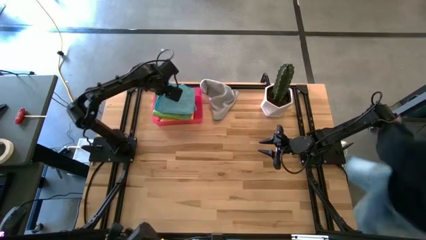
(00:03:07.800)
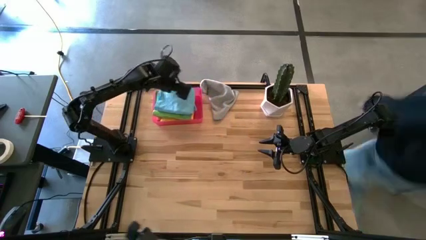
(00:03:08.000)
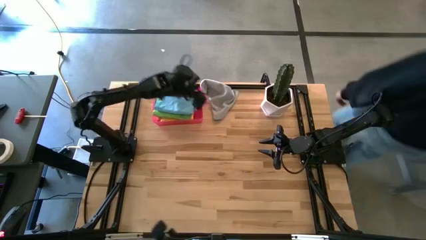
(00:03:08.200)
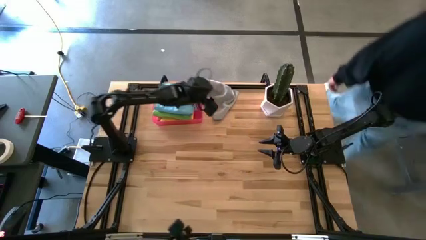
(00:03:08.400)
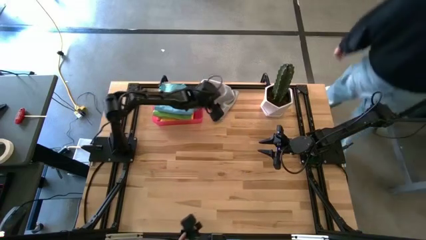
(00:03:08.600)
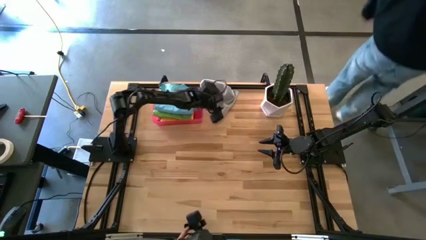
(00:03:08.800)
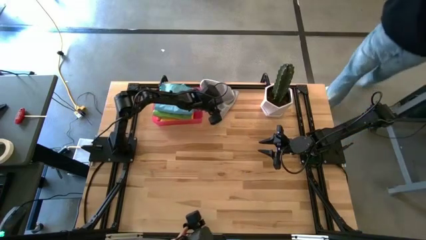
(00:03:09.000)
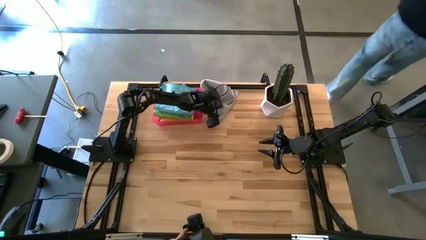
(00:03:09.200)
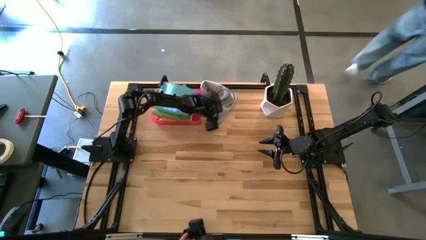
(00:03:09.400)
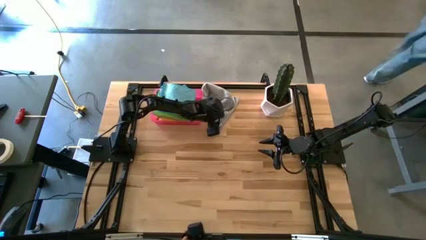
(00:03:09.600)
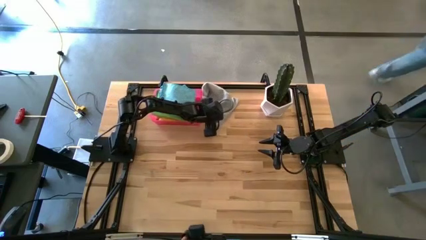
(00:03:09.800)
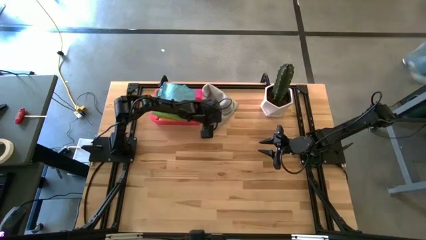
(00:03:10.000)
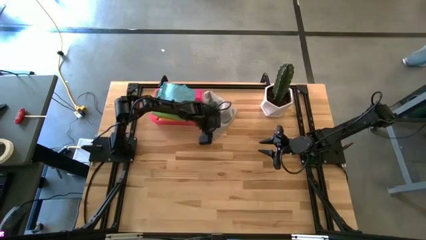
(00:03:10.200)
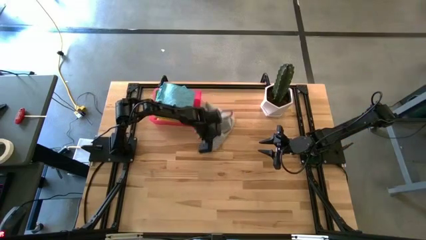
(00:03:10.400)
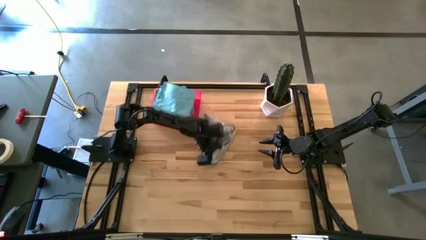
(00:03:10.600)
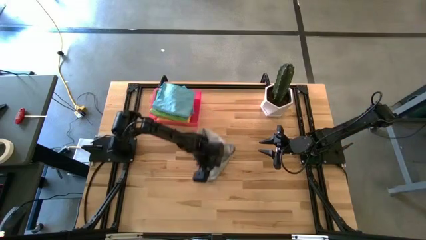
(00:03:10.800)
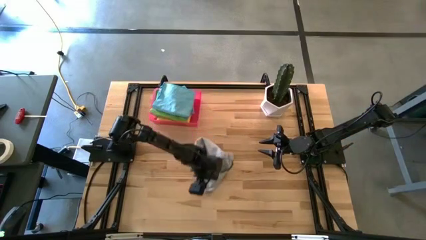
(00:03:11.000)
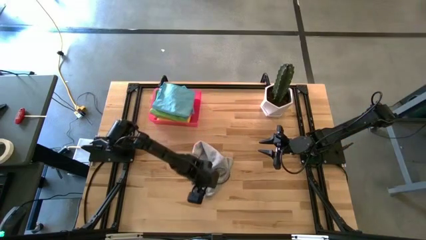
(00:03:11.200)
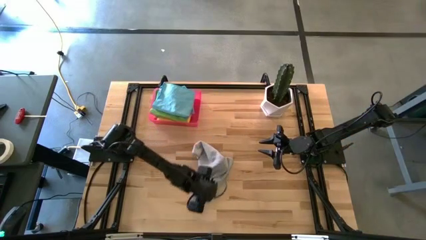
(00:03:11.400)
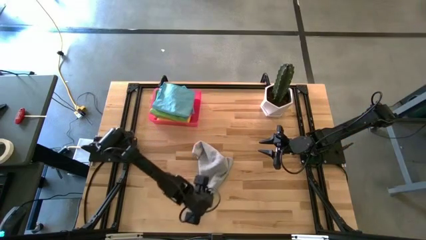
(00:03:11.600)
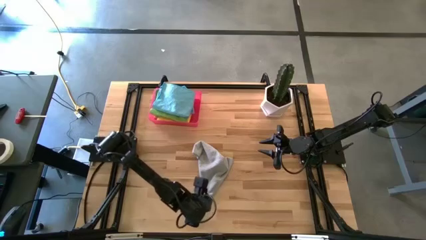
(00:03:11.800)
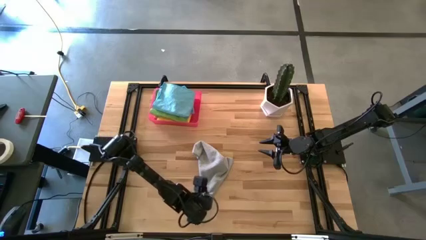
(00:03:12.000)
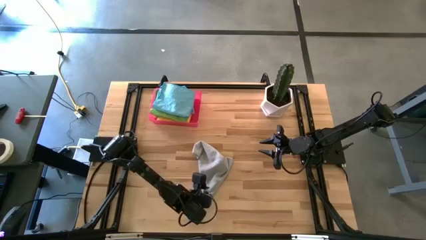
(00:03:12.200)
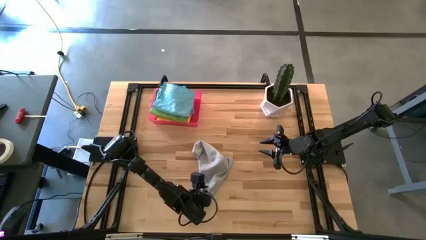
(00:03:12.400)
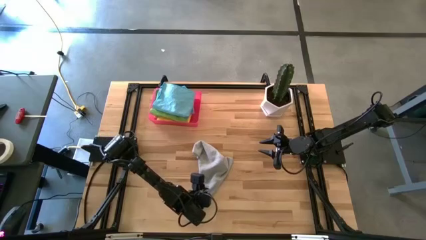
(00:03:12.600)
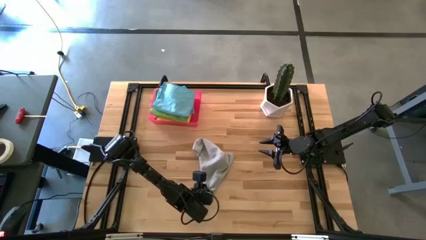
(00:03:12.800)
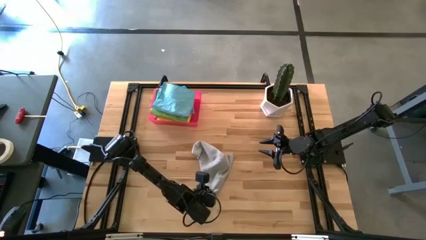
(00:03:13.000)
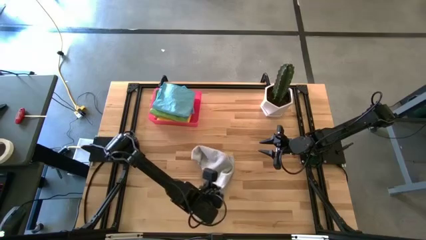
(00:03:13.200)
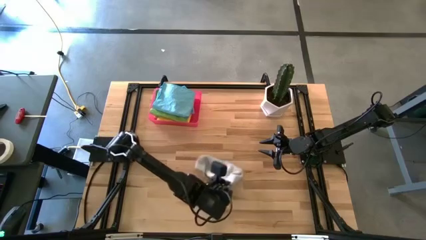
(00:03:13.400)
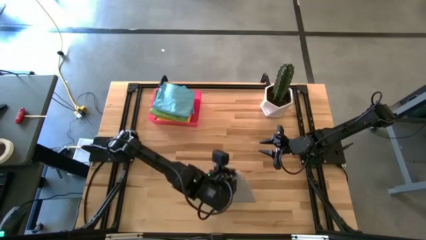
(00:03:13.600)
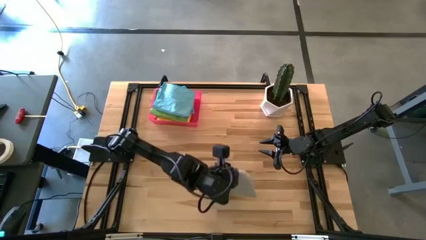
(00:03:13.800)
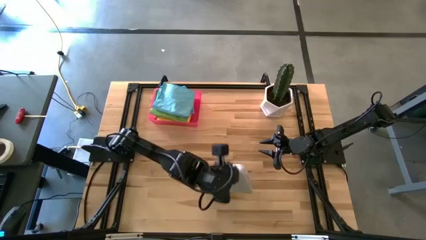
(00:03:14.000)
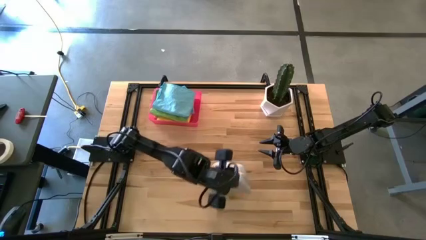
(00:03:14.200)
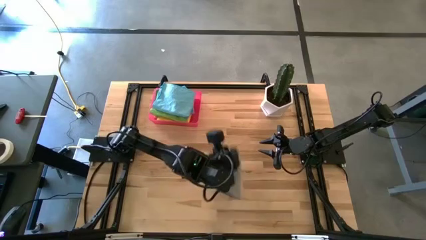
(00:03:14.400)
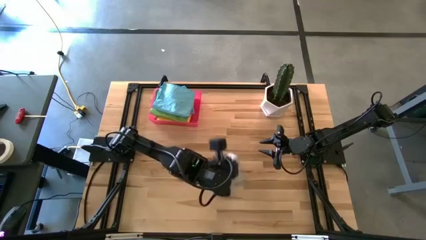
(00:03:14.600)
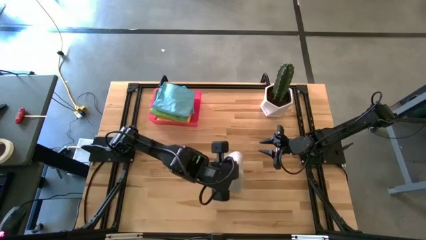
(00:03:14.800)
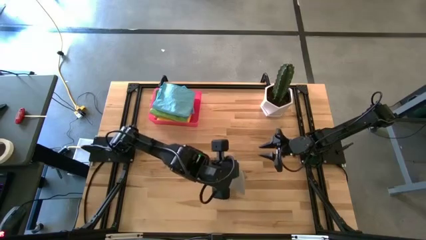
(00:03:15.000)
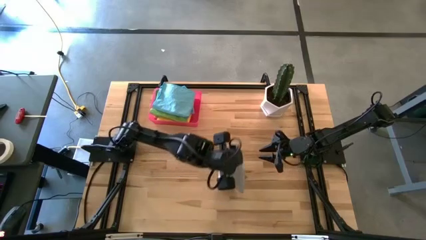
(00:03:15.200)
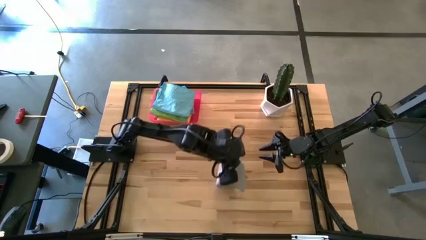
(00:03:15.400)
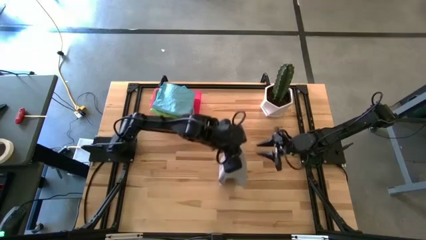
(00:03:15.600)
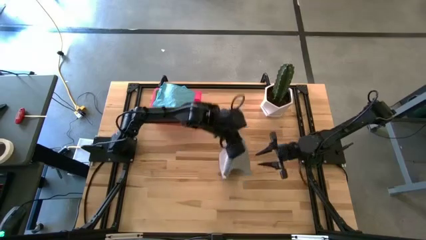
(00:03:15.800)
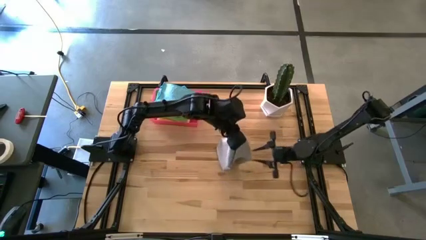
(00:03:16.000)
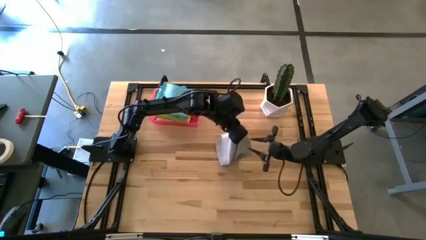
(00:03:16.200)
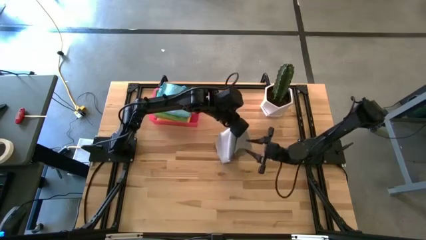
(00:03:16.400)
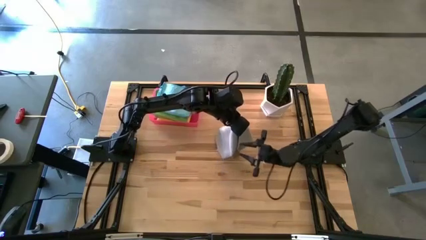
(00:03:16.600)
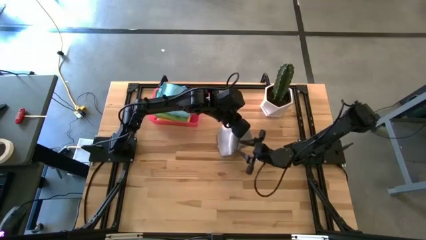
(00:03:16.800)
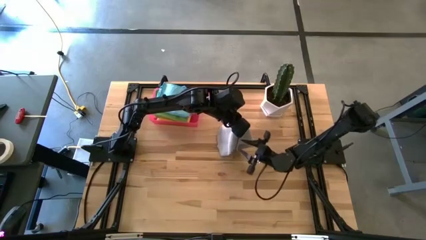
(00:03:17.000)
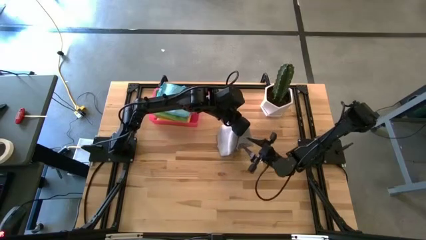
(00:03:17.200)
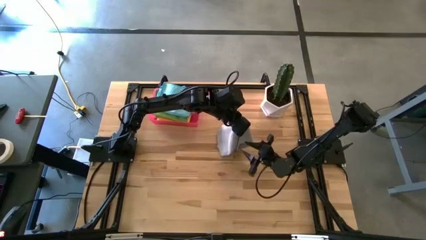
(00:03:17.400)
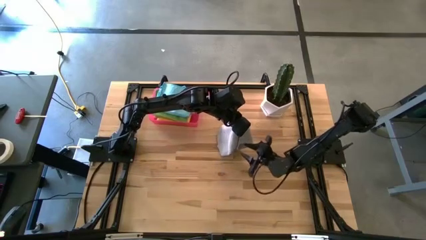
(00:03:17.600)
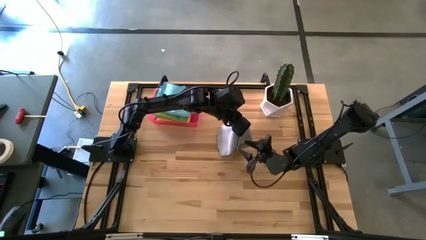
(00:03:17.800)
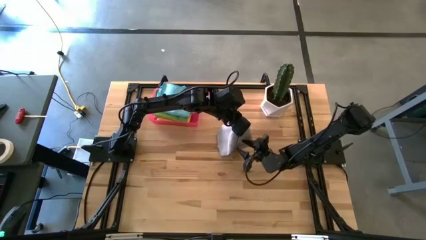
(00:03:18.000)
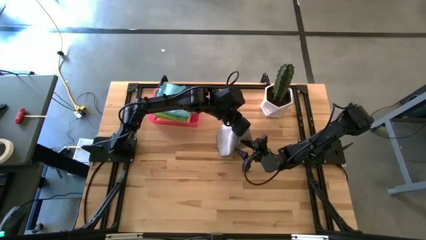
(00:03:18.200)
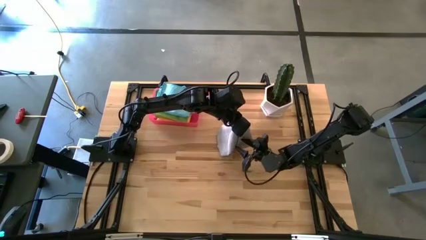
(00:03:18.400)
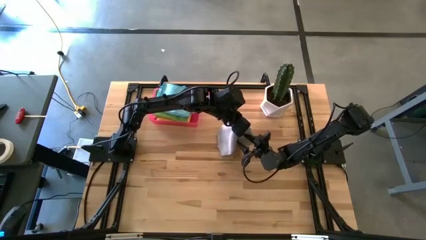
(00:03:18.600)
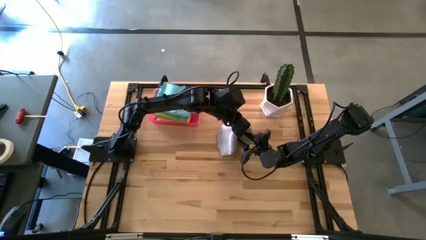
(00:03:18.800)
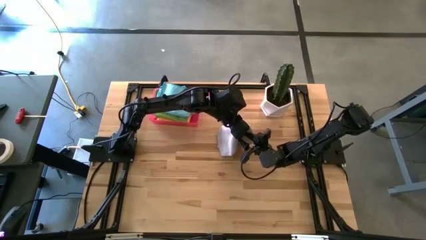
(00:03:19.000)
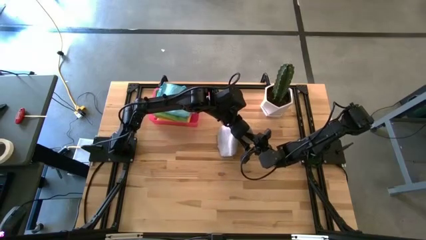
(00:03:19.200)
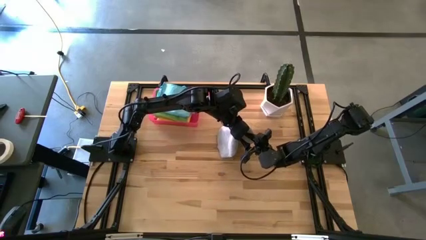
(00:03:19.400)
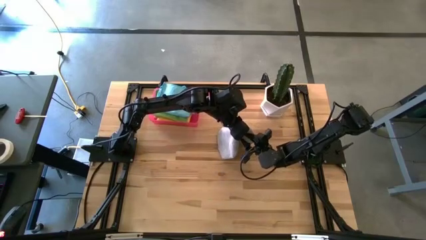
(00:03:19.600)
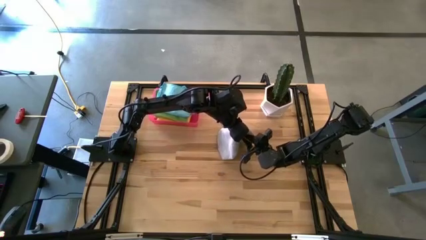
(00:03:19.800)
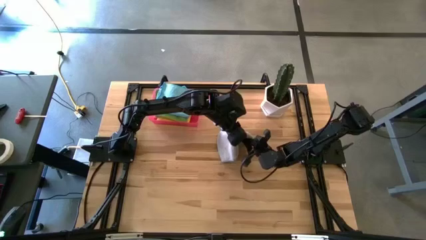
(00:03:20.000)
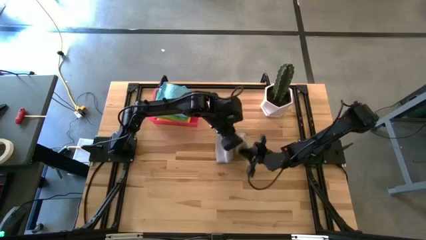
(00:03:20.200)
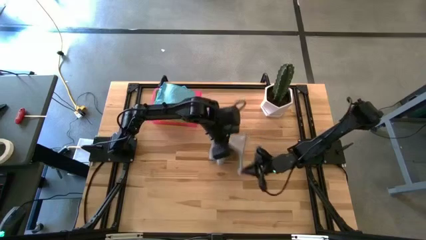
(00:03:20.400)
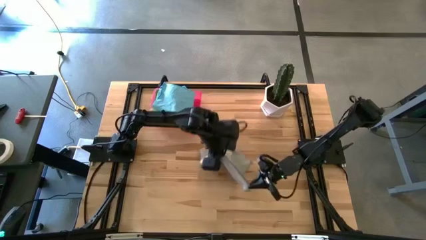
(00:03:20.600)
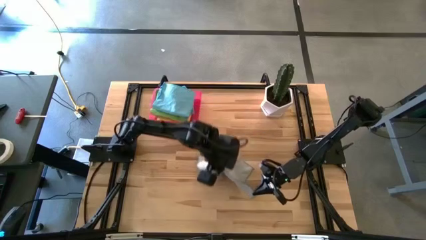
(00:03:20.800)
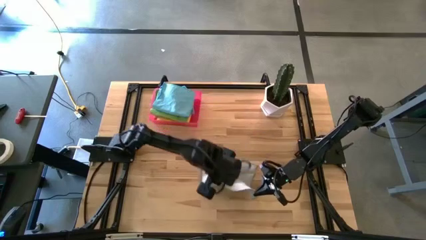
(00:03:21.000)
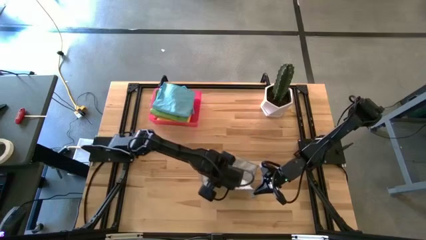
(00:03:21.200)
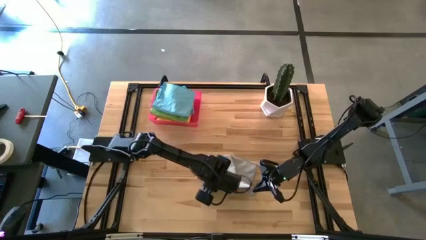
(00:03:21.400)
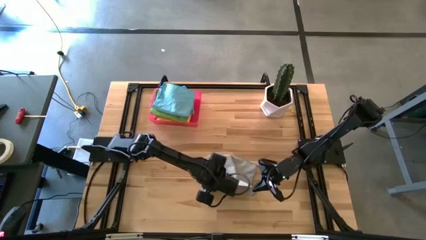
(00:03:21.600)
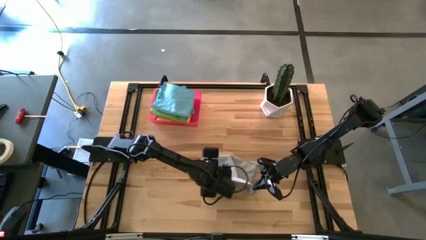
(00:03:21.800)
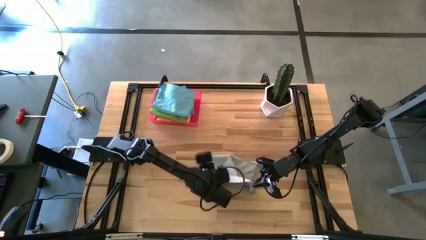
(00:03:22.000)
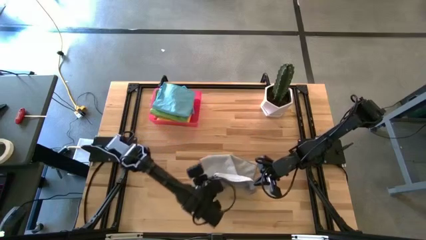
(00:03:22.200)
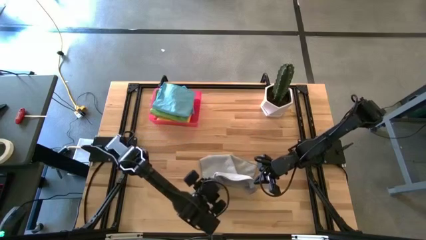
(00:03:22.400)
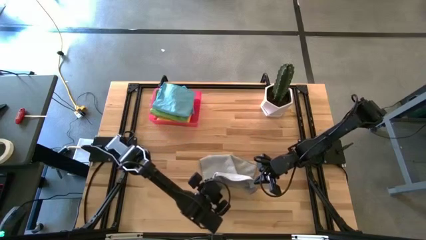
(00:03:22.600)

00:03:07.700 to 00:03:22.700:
Task: Fold microfiber towels
Fold the gray towel on the table
